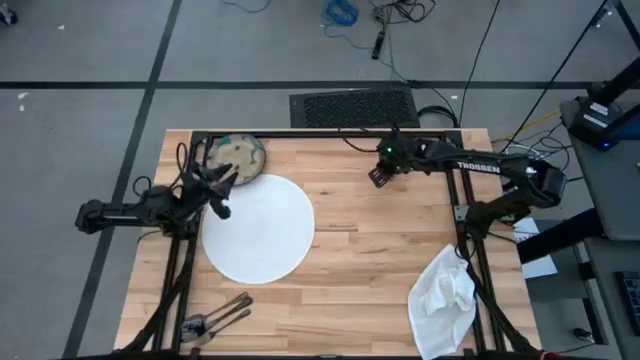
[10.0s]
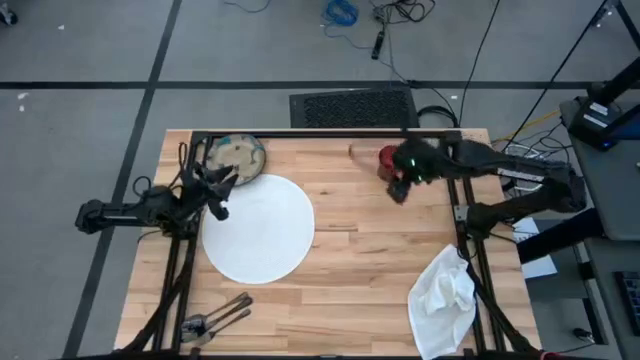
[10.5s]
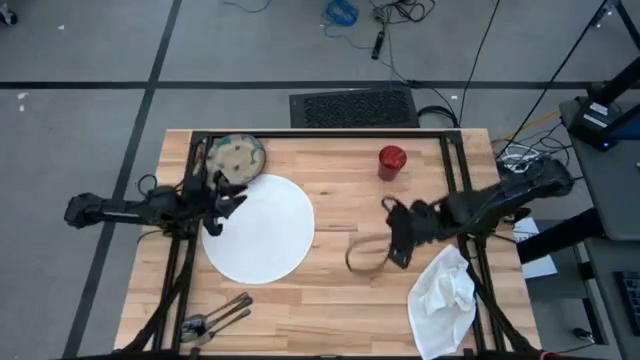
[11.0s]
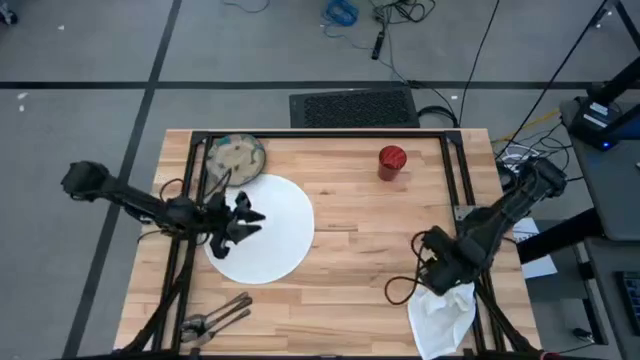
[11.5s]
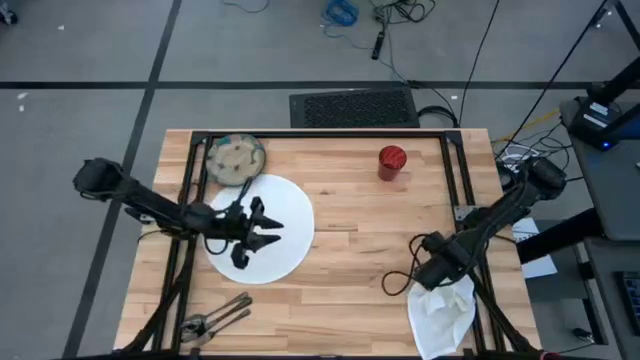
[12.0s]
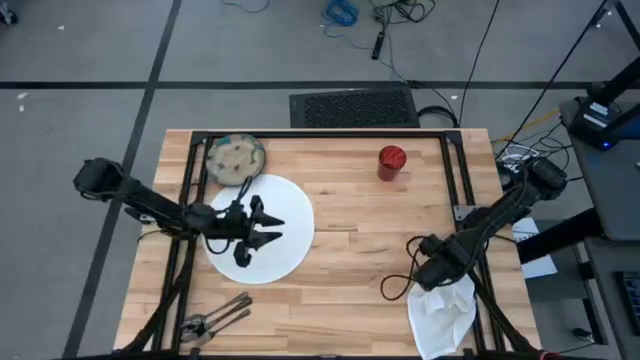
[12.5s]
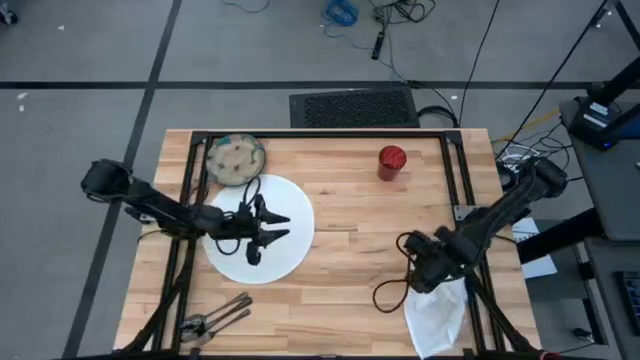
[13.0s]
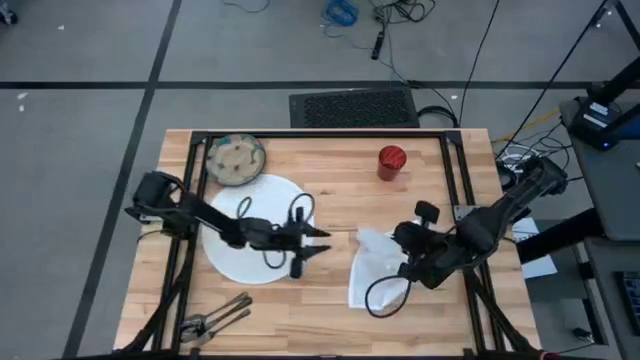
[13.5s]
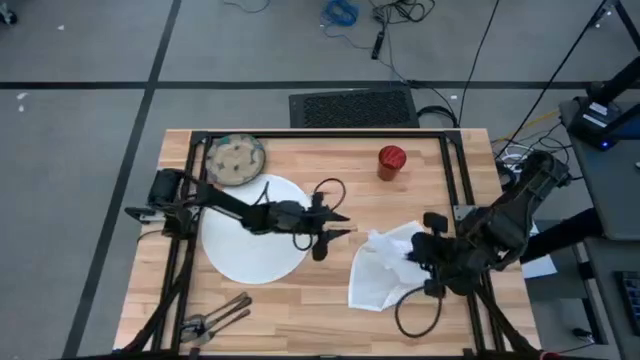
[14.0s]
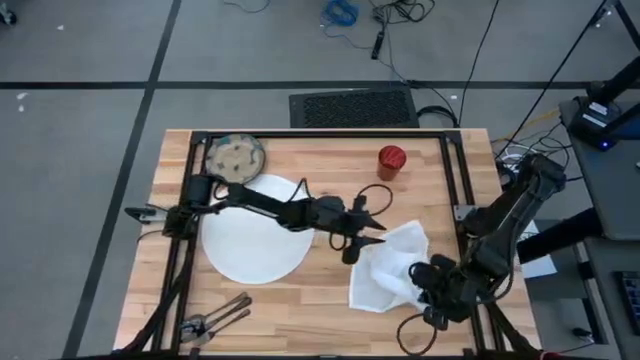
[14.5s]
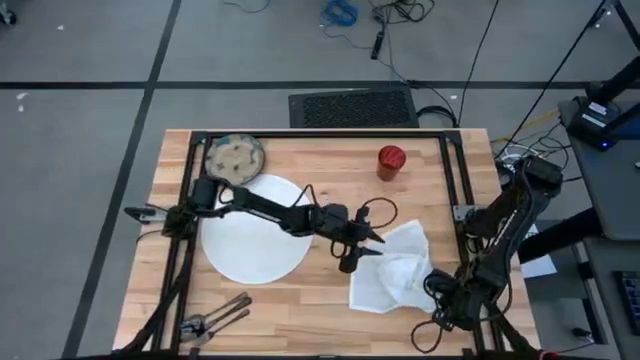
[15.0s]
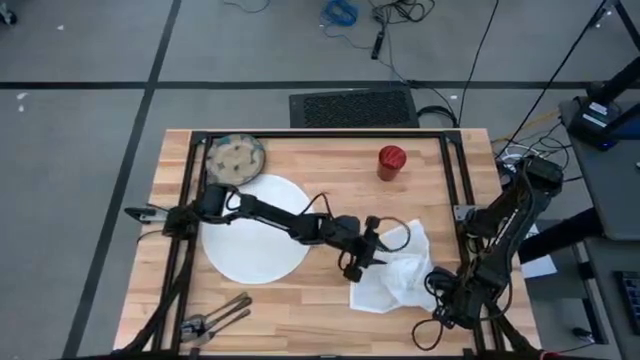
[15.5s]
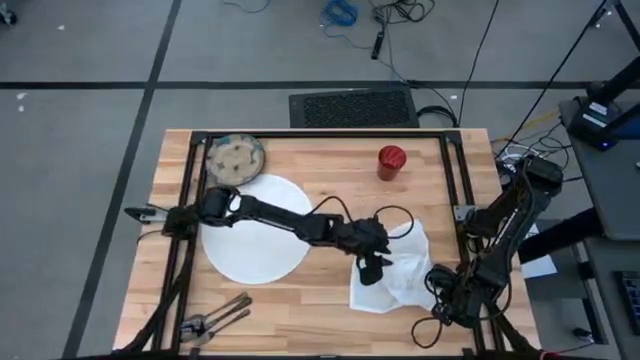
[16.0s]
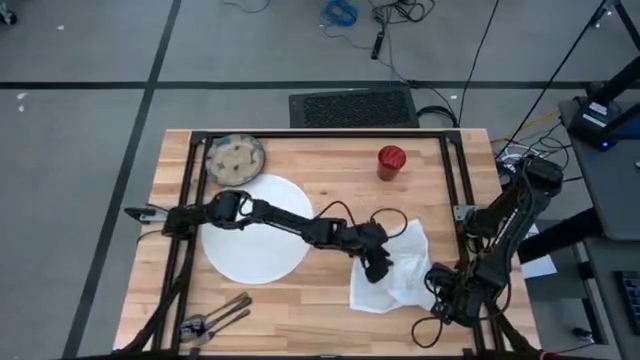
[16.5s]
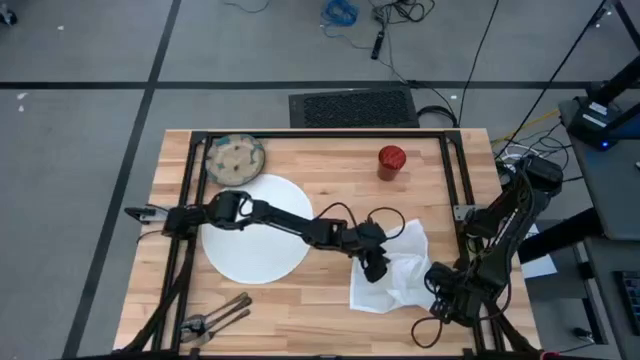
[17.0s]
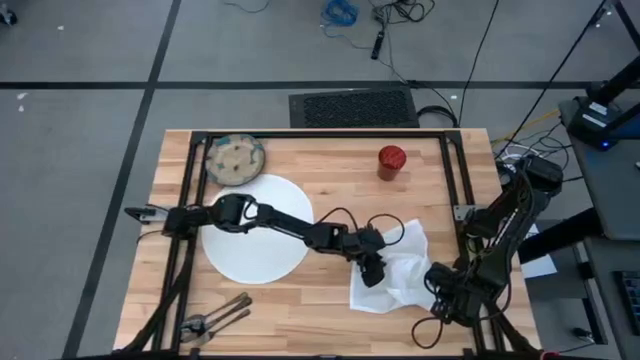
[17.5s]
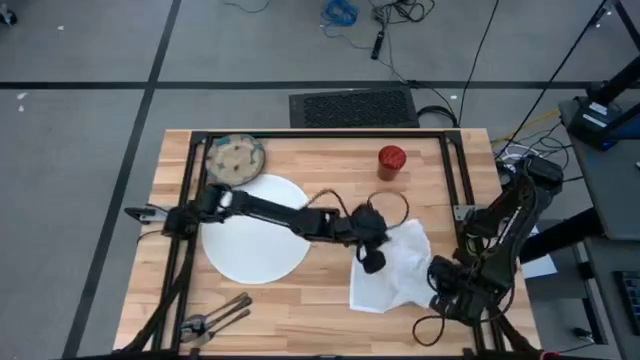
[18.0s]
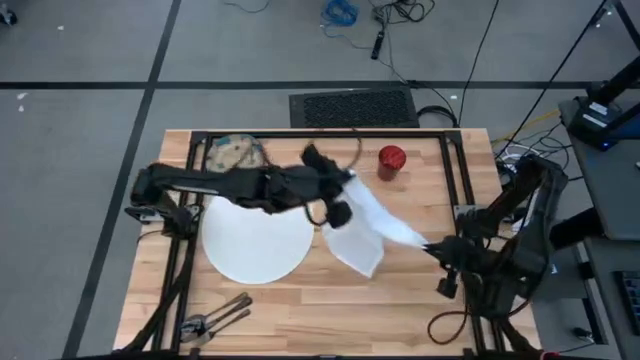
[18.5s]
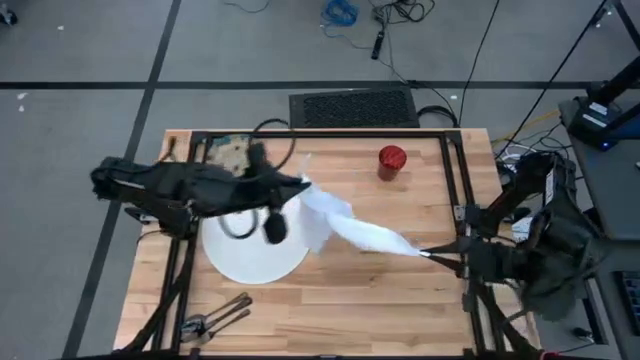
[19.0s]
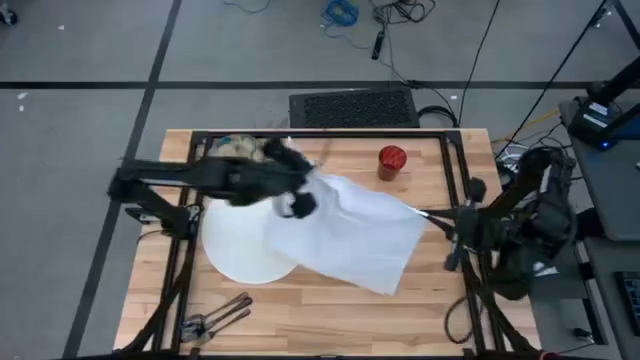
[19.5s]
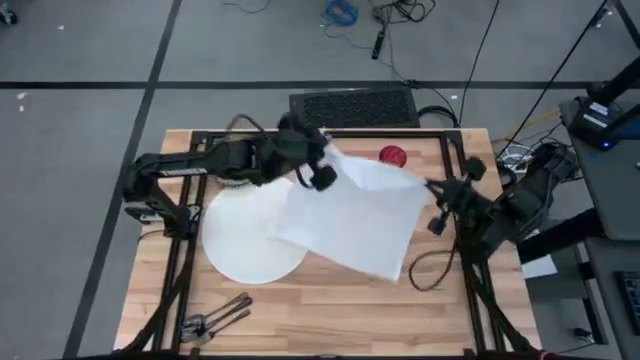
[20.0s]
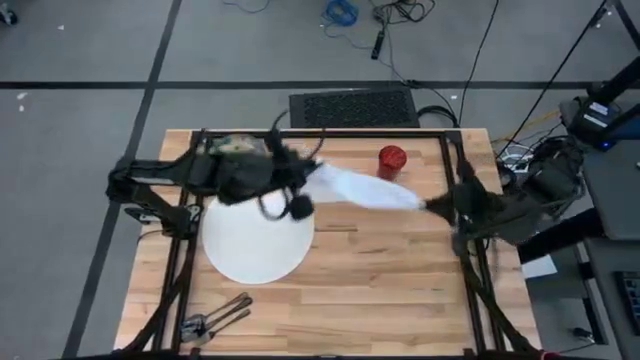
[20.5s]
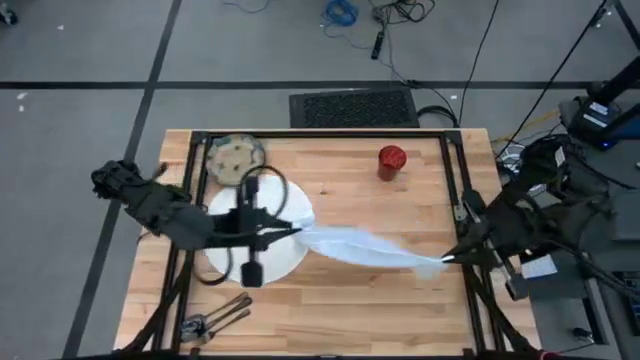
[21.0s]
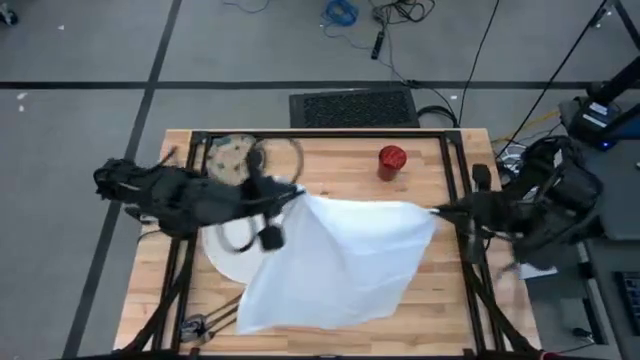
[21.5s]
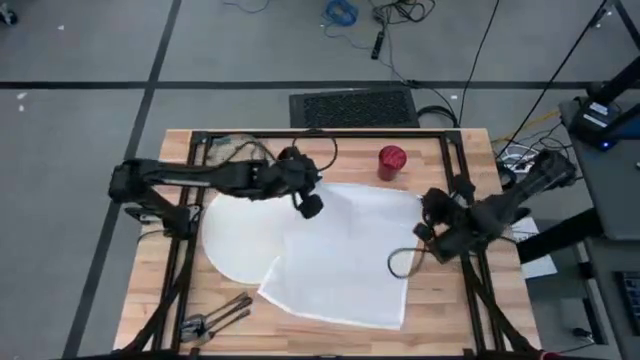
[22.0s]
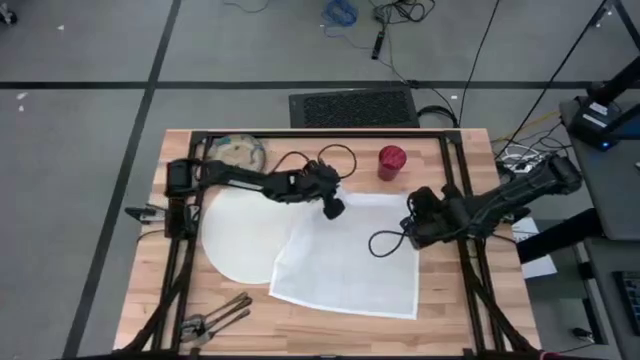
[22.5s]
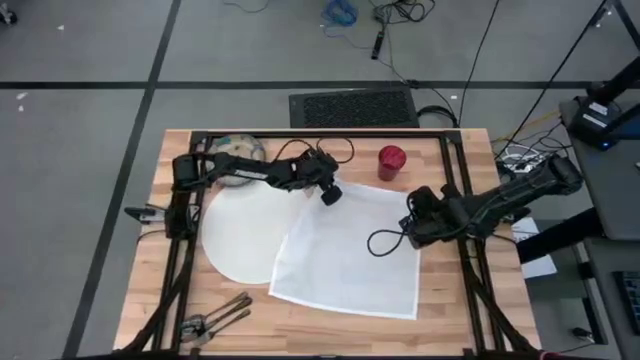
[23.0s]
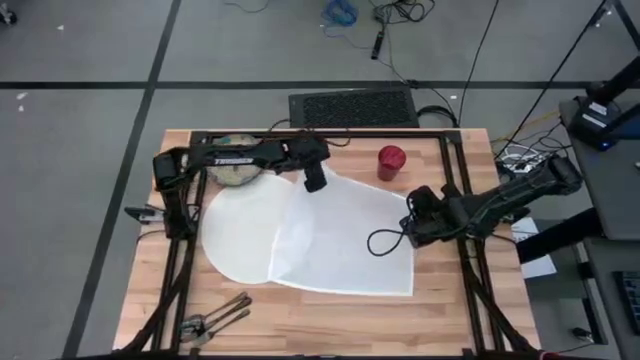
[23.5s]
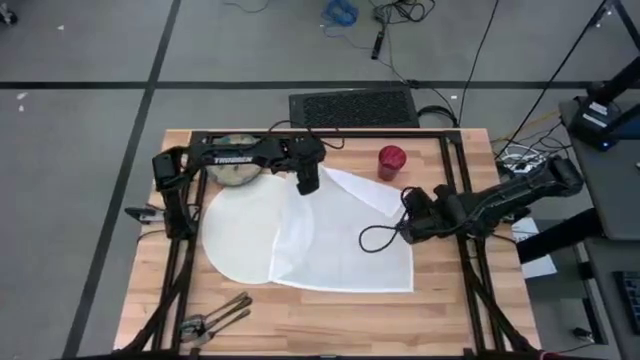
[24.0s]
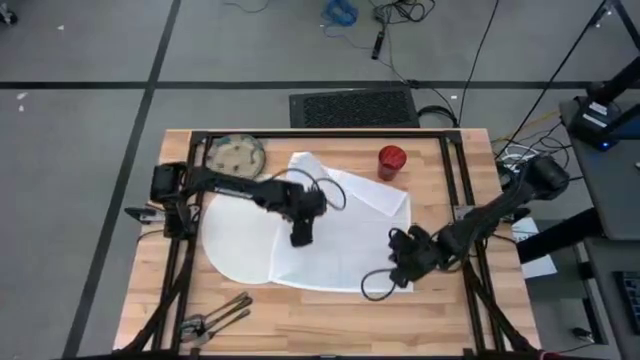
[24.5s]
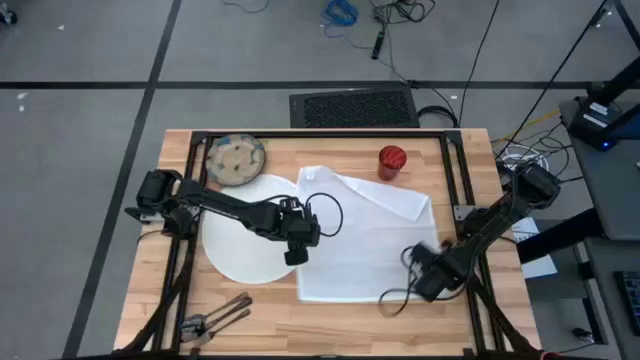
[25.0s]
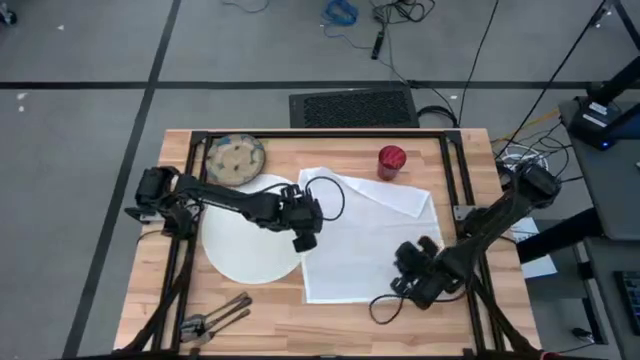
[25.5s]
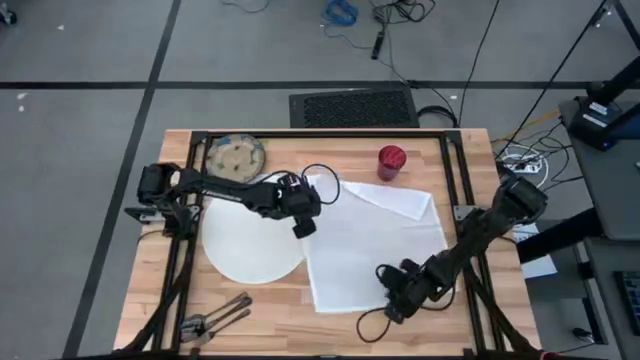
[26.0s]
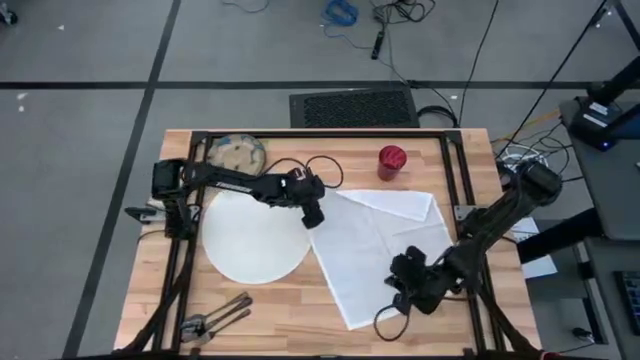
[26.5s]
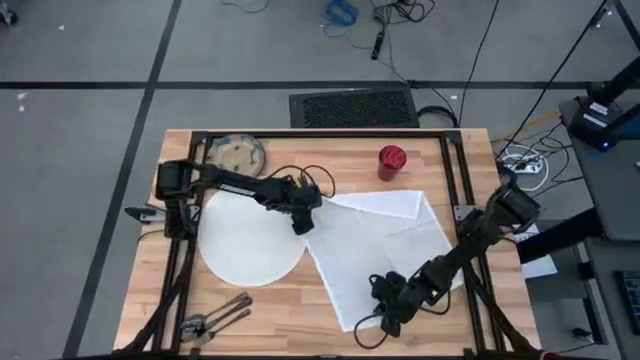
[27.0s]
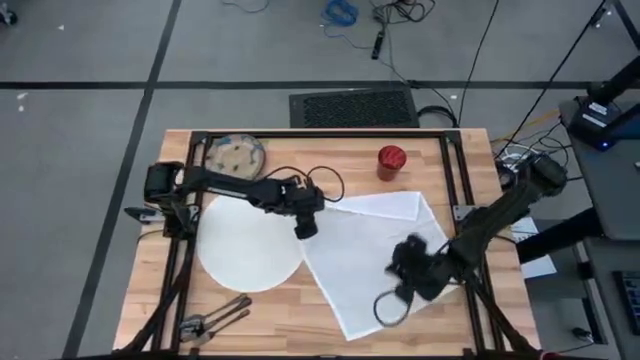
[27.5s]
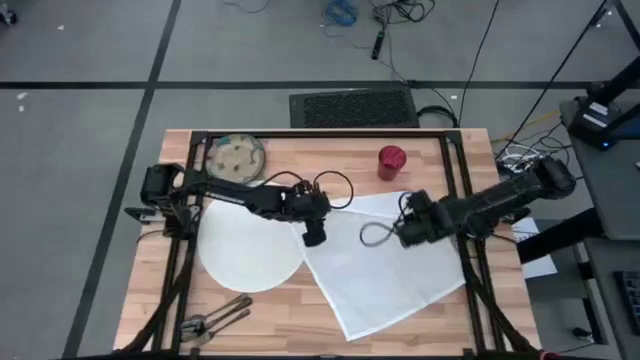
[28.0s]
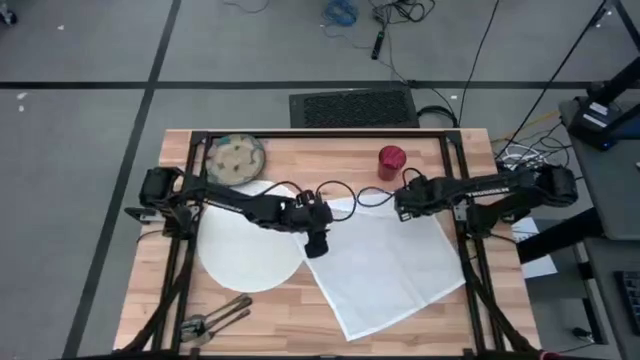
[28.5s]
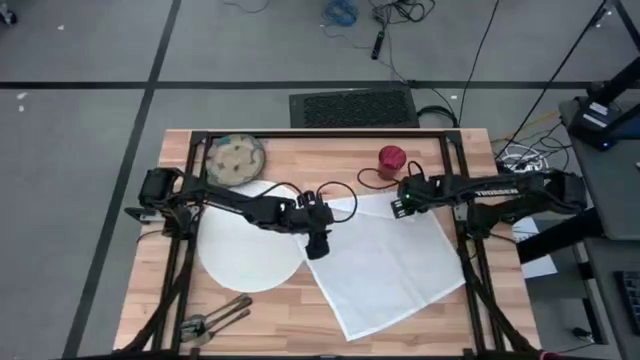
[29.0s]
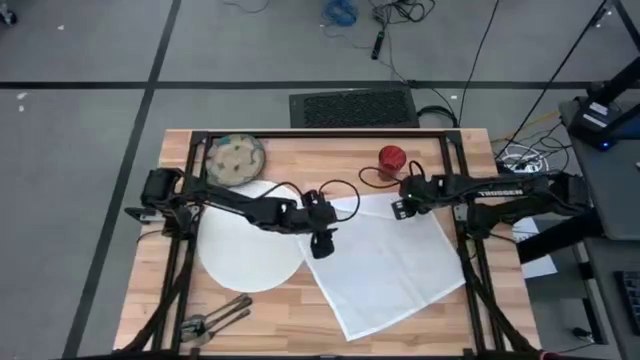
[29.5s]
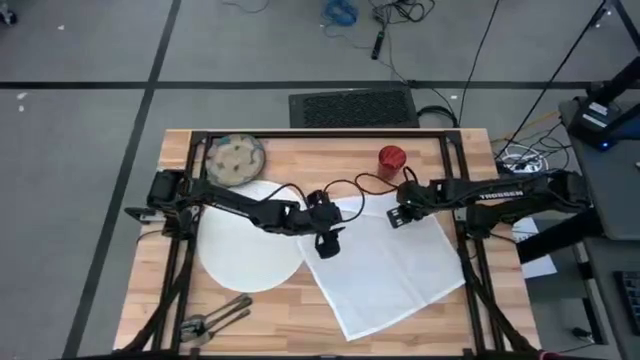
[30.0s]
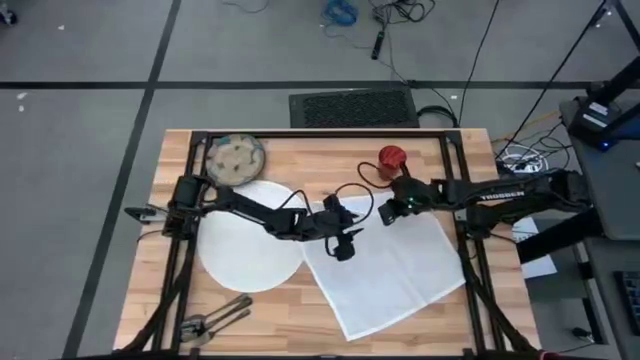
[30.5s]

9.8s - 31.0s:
Task: Set table place
Fold the white napkin
